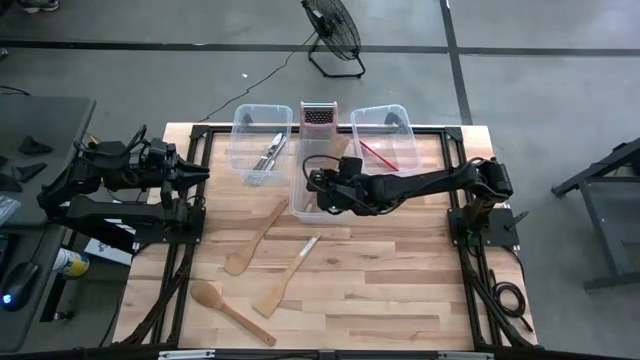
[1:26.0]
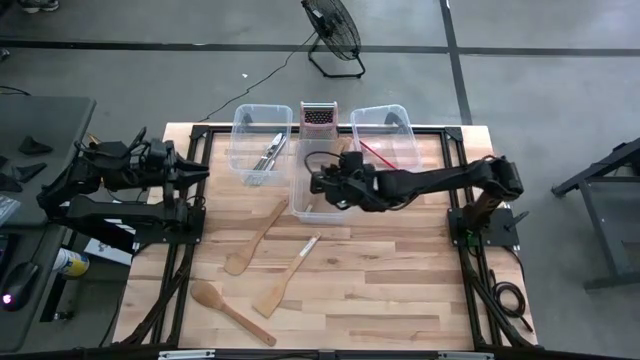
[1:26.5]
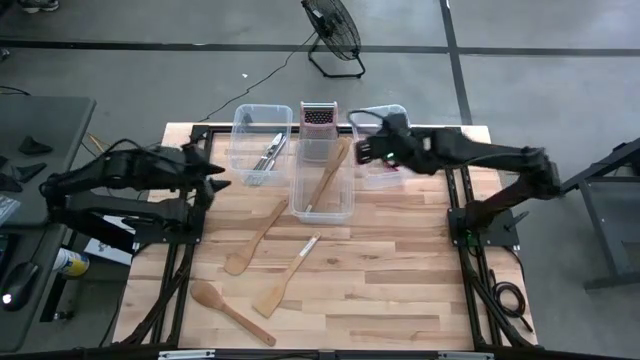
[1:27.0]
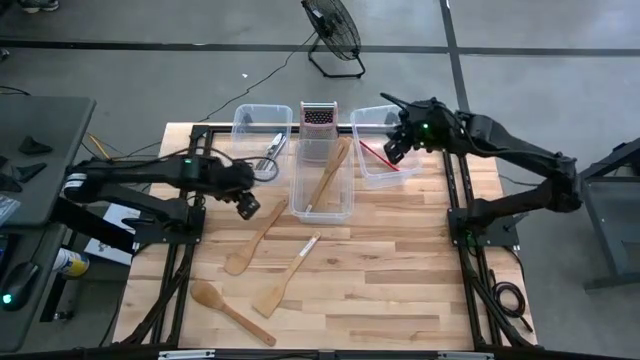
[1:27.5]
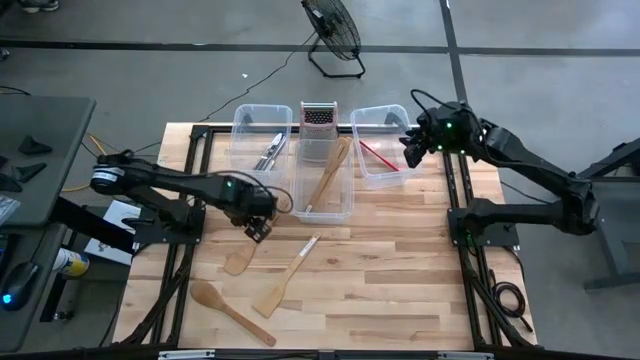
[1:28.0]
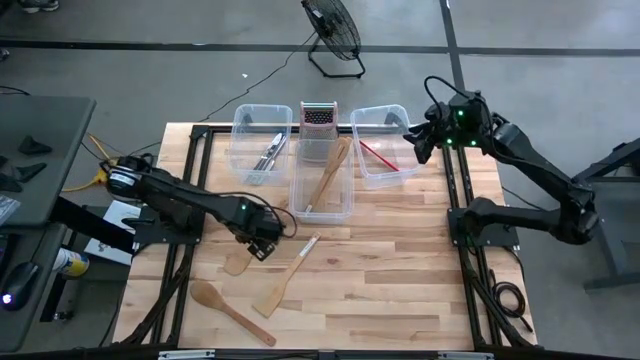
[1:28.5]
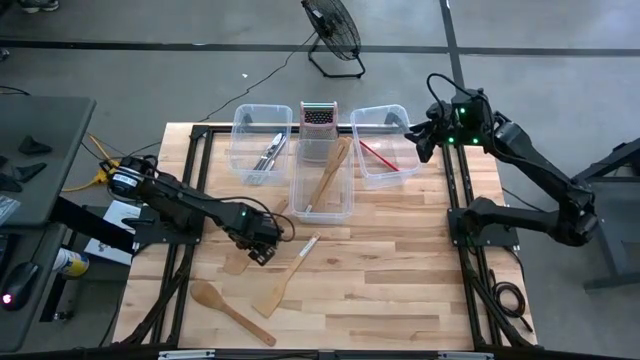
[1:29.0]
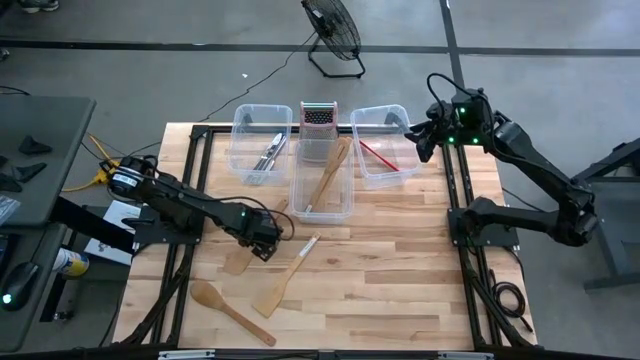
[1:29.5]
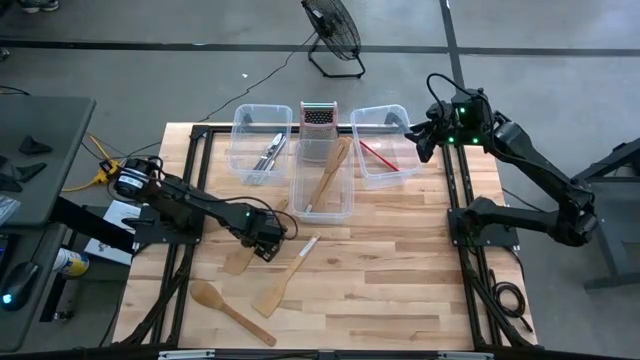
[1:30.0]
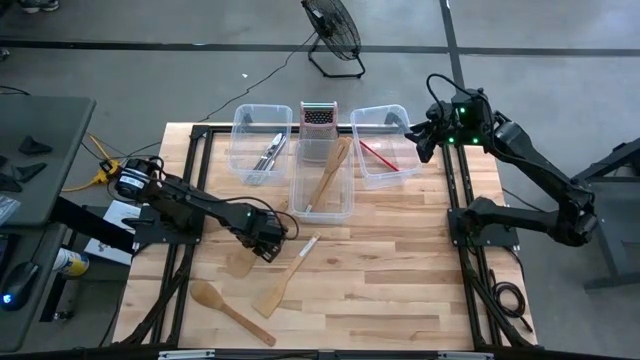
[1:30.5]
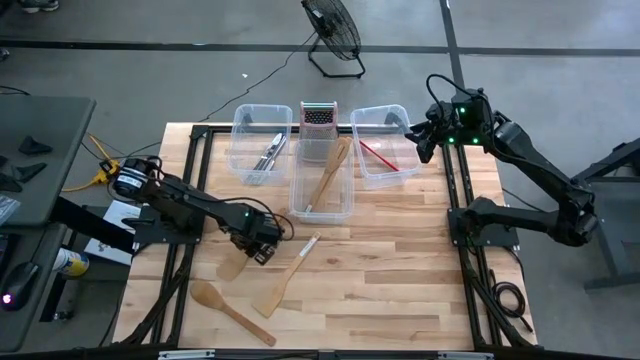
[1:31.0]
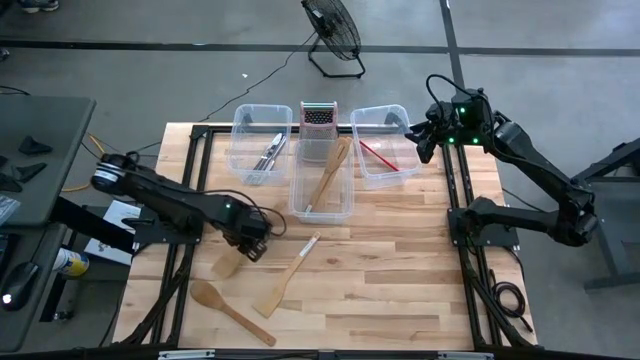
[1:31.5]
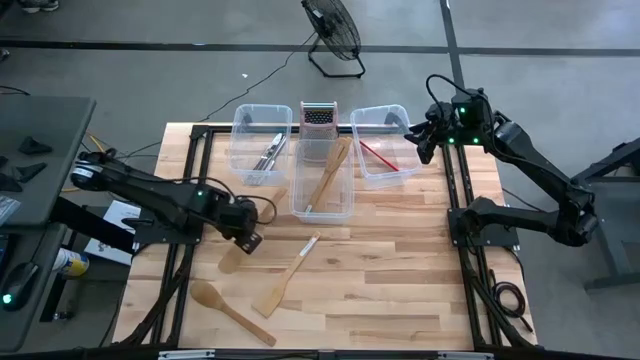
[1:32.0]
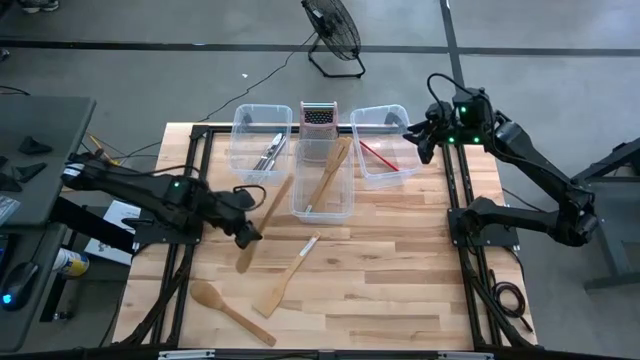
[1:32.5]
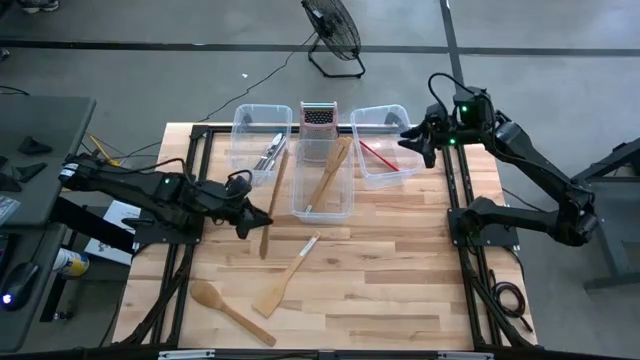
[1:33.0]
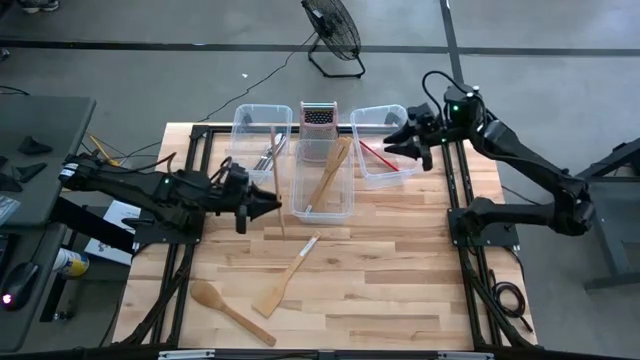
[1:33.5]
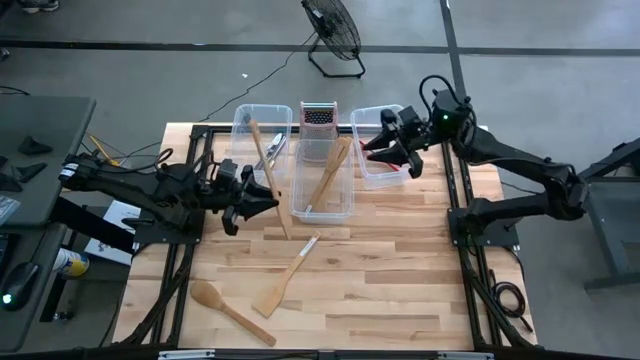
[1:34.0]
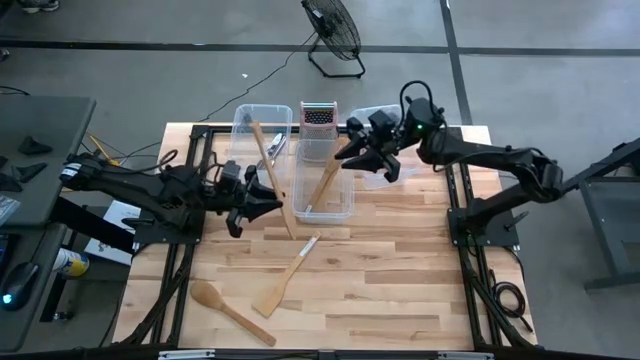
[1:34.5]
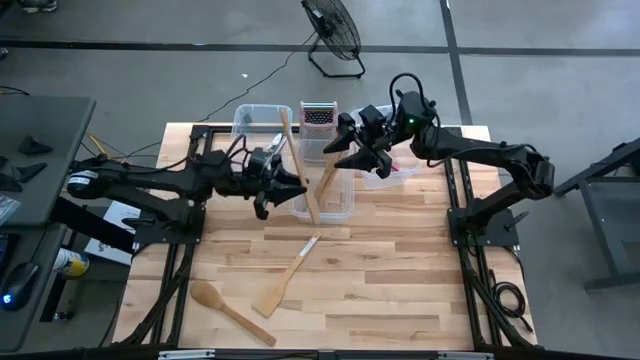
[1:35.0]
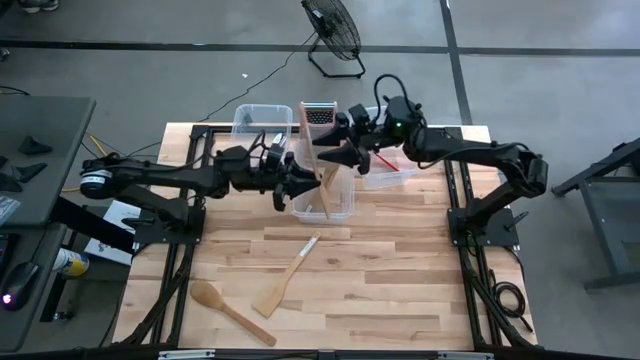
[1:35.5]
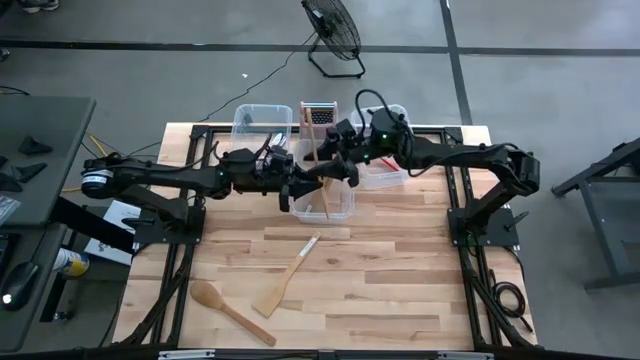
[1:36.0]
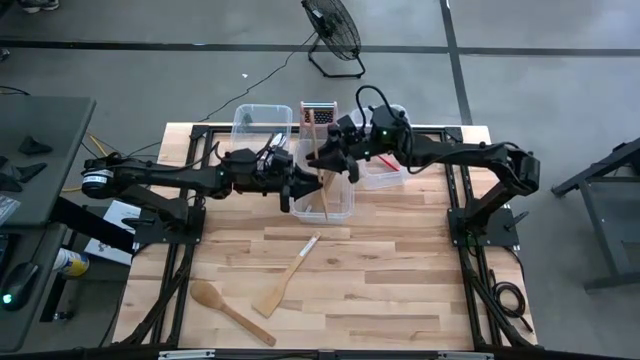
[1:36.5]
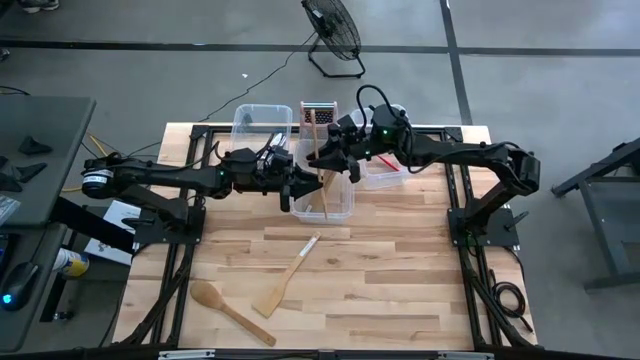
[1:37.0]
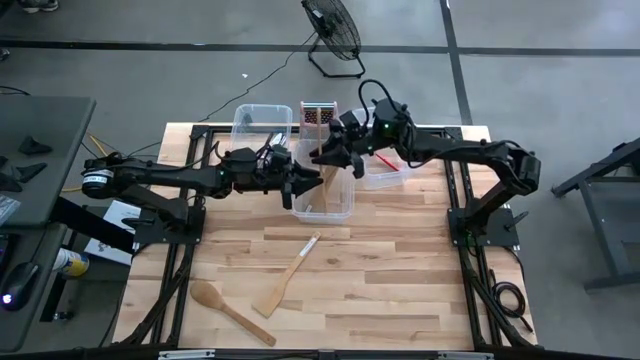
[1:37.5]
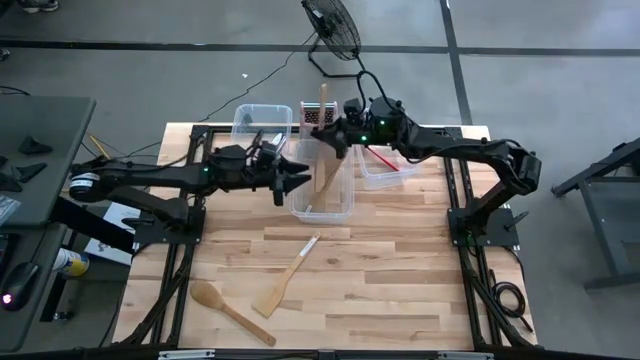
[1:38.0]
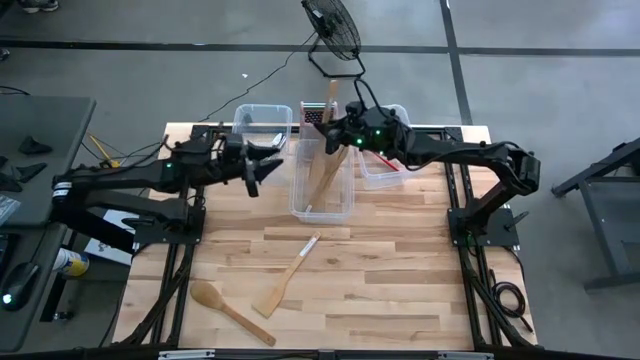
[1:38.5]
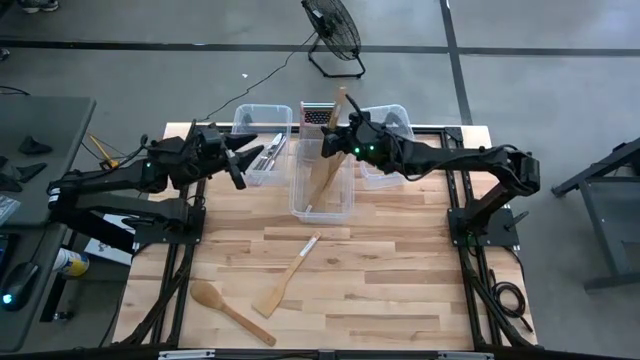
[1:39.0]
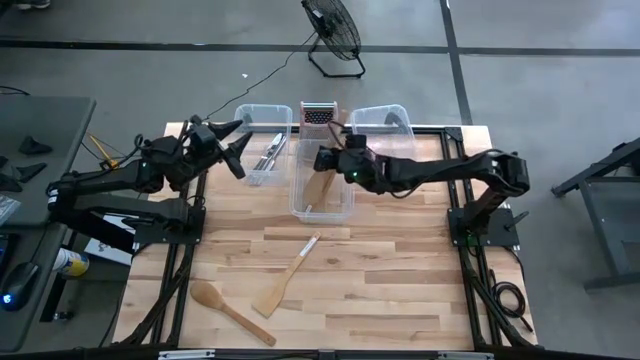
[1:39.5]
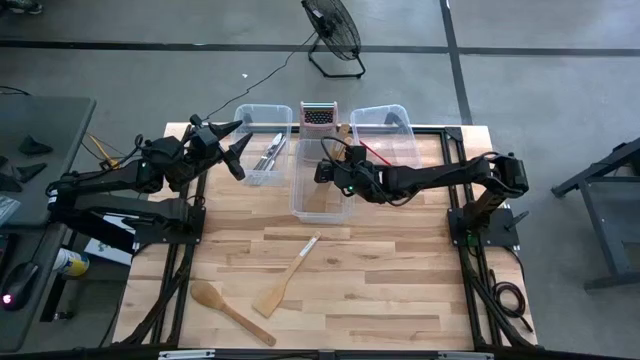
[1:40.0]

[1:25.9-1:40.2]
Task: Pick & Place Kitchen Items
Put the brown serving spoon into the middle transparent bin
